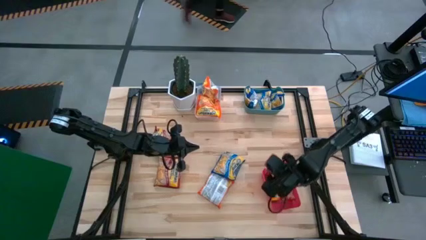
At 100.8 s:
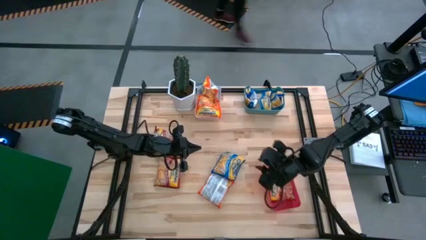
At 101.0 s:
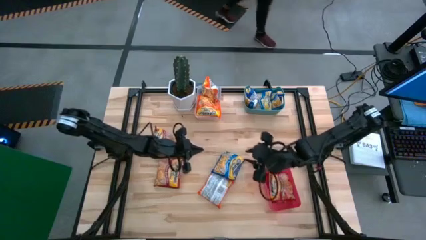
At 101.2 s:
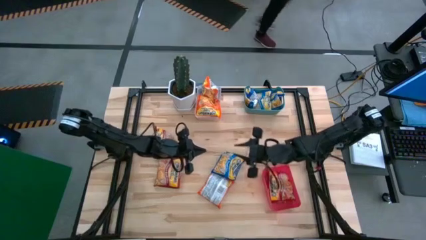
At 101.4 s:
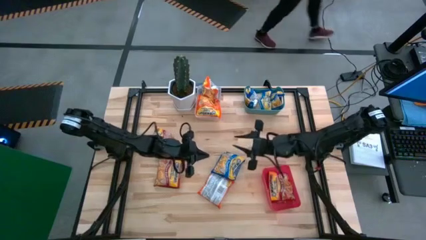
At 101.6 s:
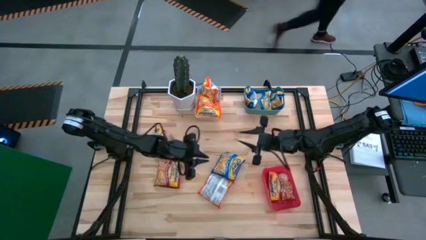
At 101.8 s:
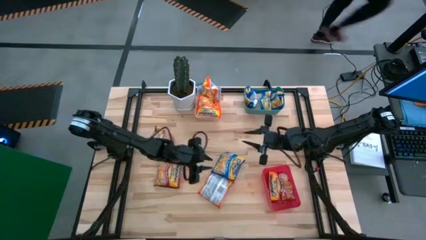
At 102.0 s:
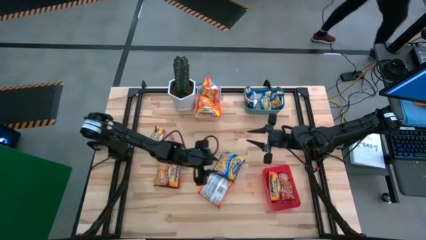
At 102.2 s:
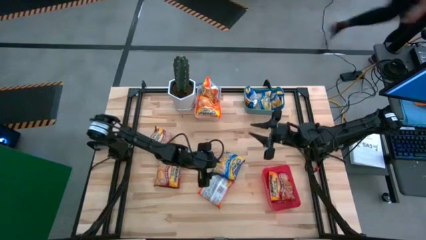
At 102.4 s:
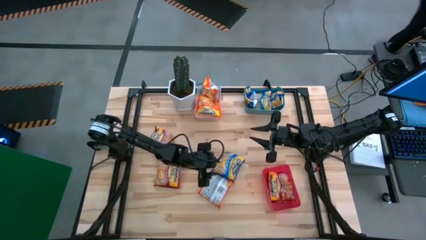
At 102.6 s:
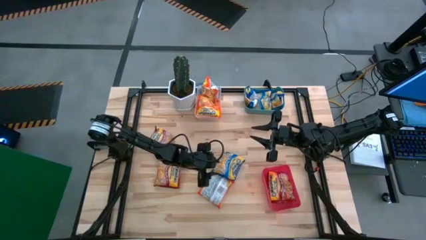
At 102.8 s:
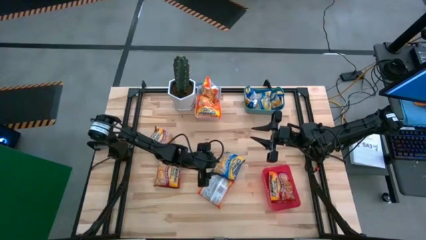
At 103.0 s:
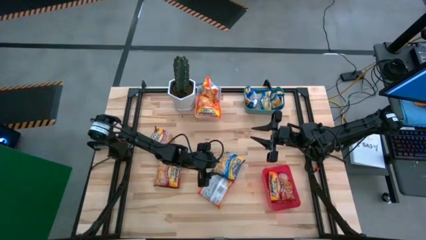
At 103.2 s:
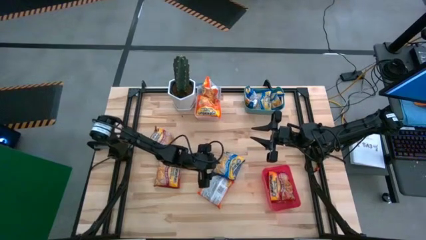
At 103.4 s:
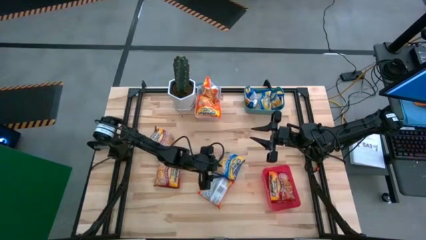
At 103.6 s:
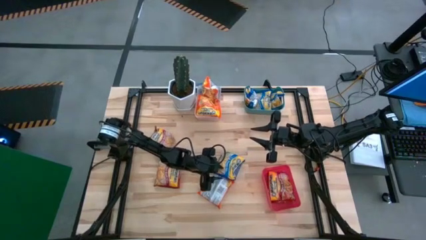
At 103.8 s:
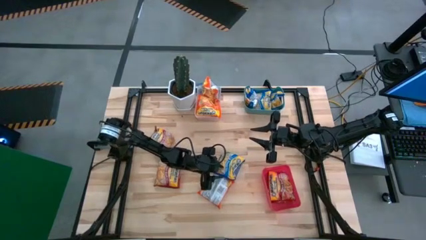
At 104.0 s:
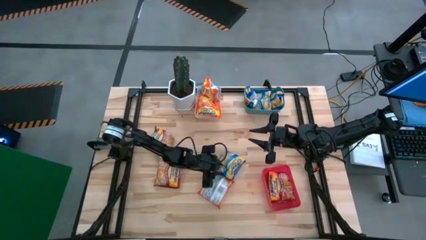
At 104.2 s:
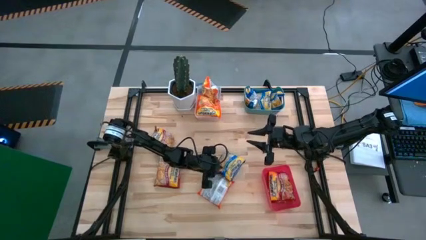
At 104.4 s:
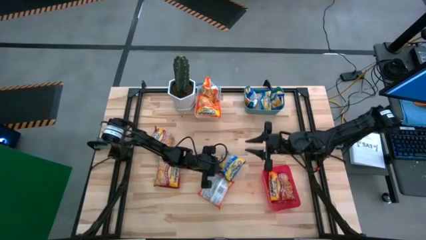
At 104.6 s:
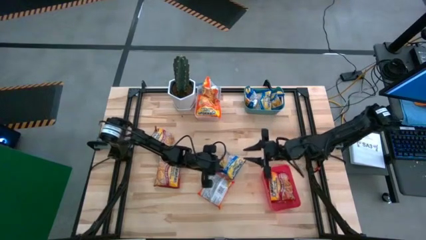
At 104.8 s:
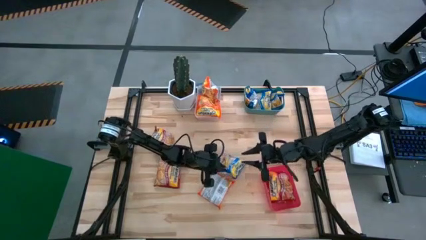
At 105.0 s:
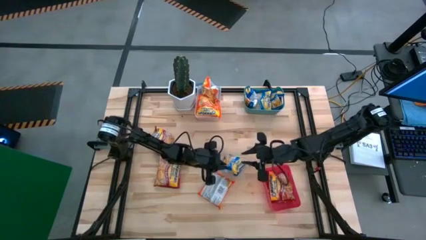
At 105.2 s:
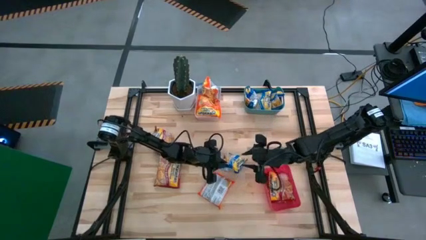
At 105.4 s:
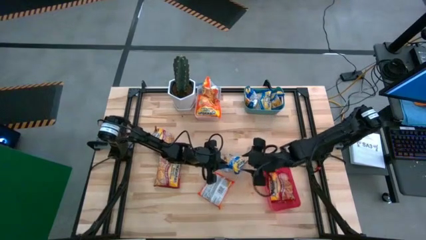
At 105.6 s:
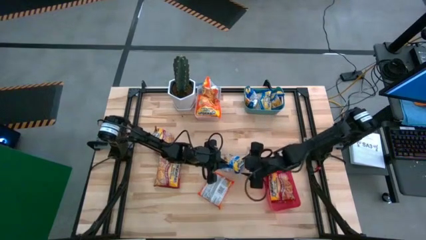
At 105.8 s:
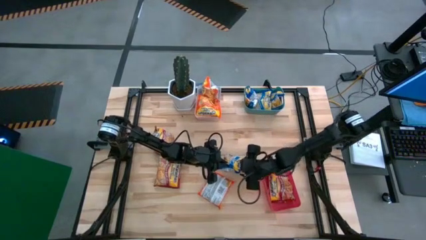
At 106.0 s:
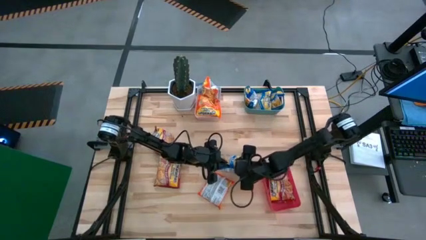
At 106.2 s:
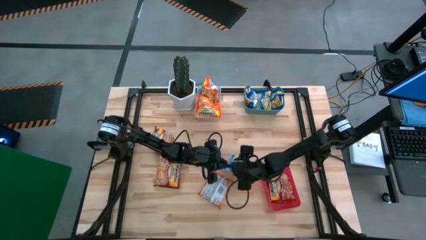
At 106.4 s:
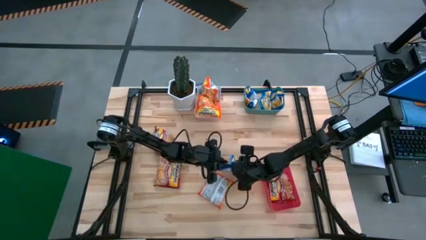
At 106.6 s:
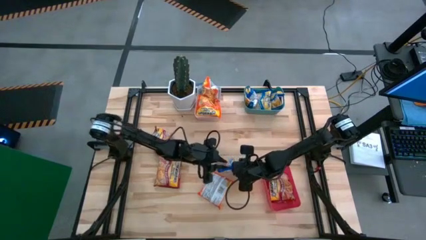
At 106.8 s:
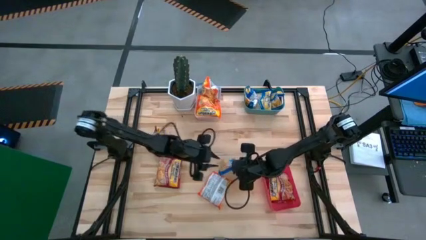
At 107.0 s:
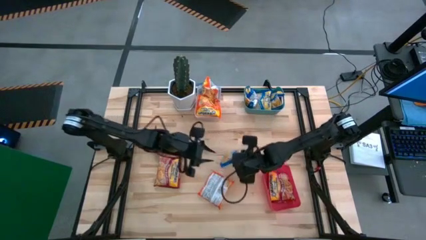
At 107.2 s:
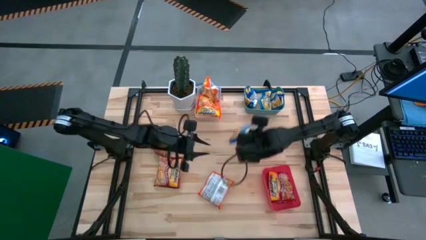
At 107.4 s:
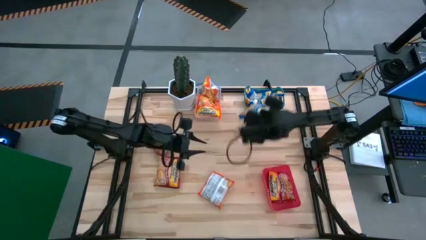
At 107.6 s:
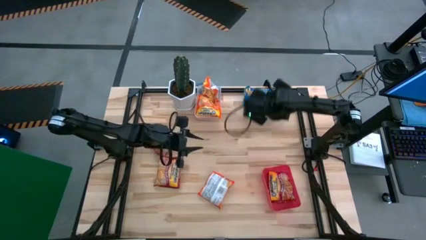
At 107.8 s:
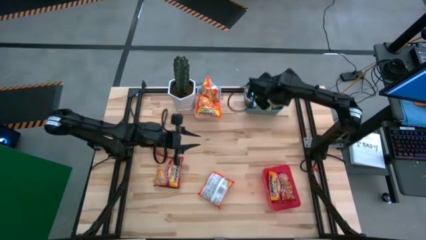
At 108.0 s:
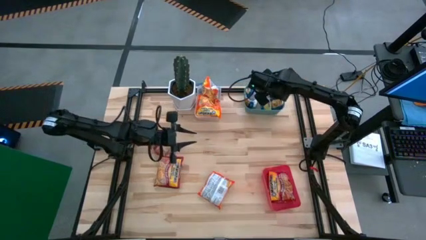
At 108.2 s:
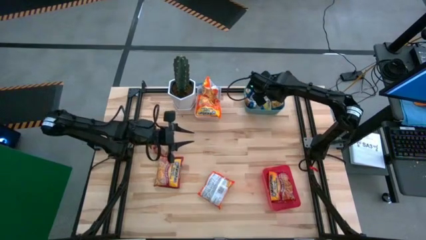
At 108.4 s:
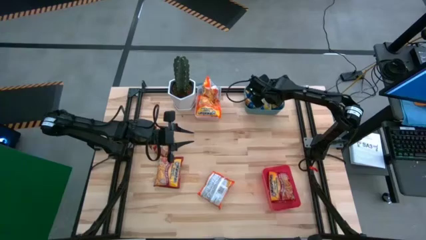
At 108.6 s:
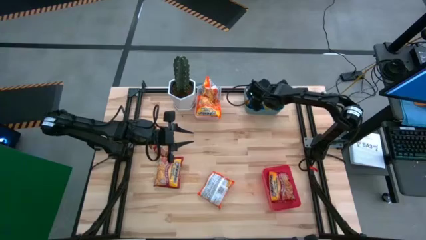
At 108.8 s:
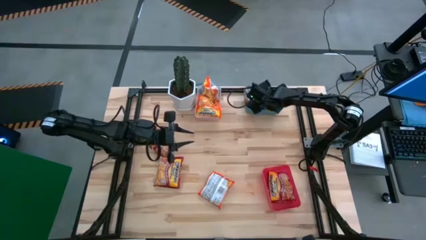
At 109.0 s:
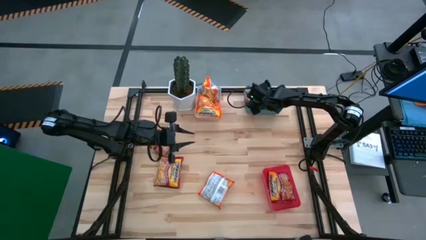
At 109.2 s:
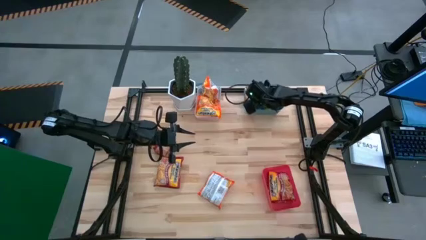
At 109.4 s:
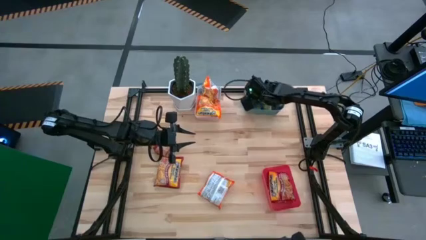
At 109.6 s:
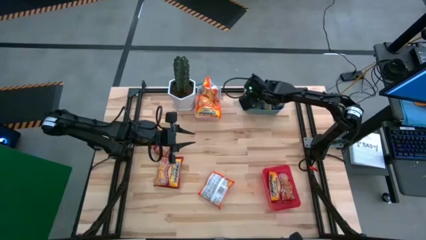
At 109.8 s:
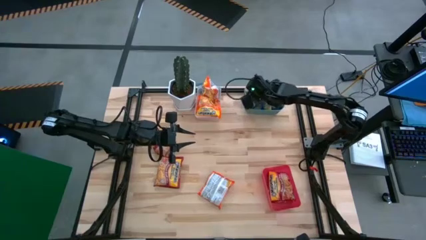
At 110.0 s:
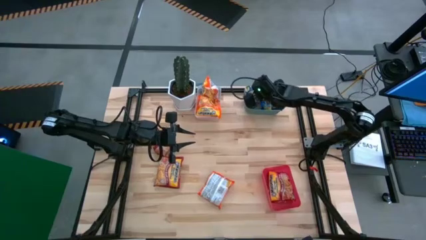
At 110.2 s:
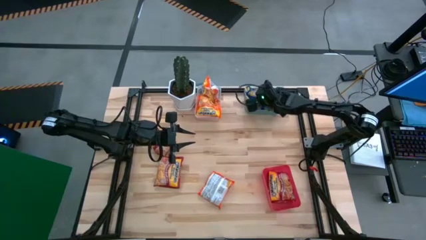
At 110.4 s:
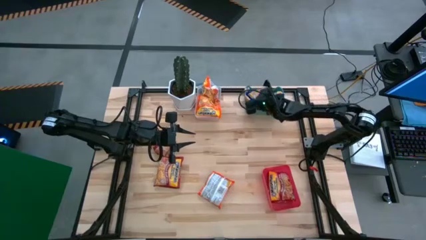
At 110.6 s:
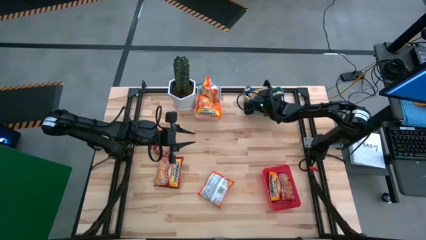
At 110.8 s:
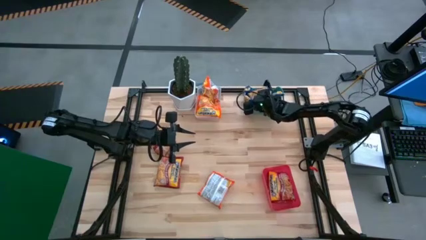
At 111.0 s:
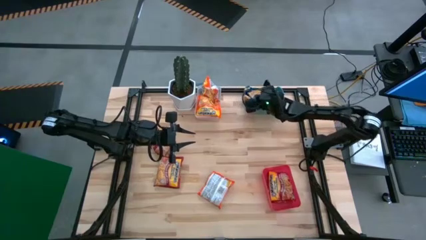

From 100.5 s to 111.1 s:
Task: Sort Maruchan noodles
Put the blue noodle pack into the green bin
